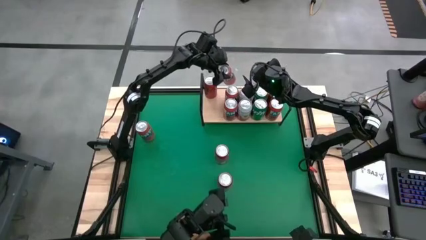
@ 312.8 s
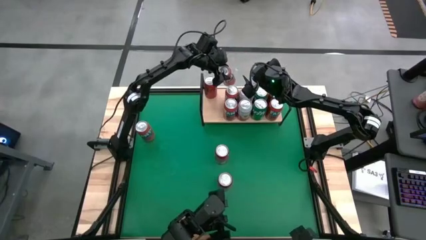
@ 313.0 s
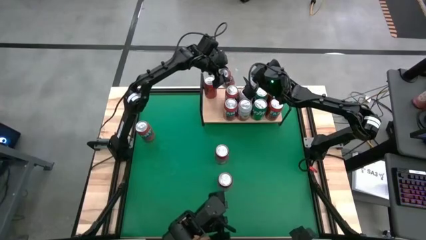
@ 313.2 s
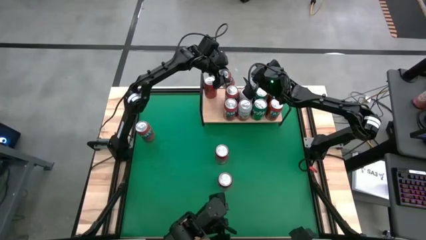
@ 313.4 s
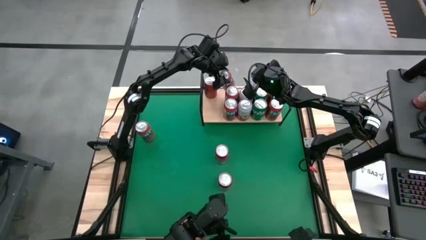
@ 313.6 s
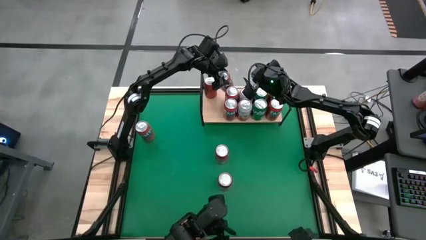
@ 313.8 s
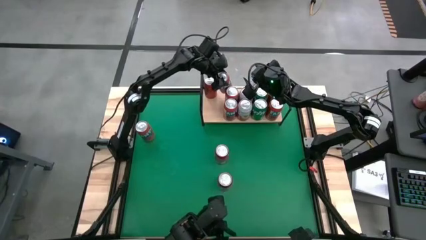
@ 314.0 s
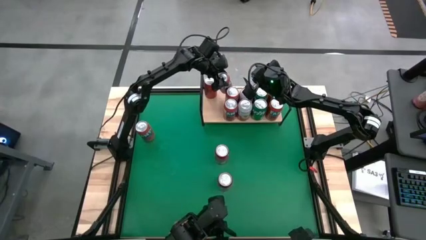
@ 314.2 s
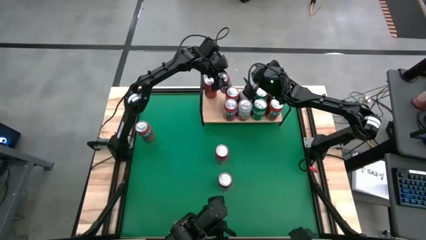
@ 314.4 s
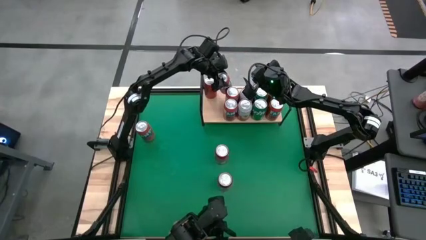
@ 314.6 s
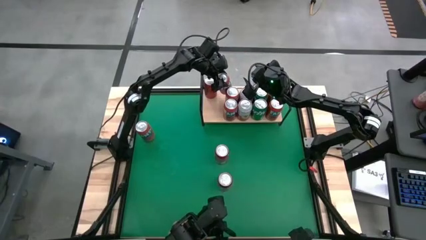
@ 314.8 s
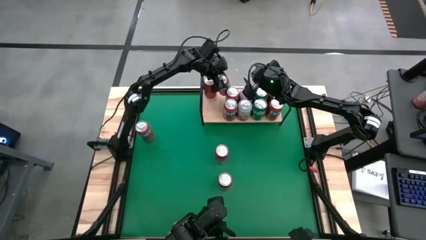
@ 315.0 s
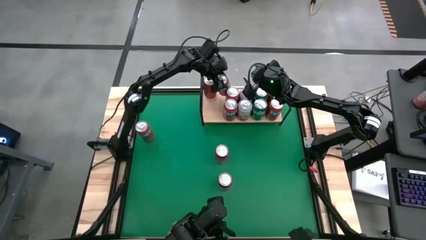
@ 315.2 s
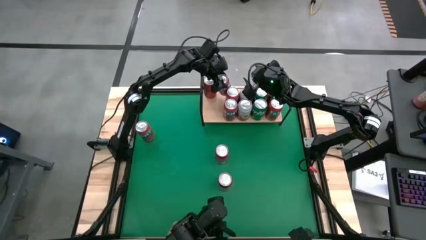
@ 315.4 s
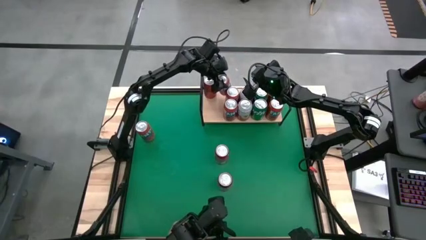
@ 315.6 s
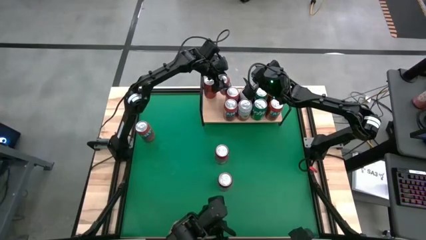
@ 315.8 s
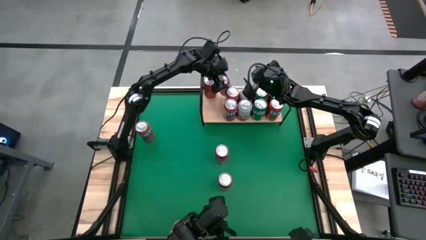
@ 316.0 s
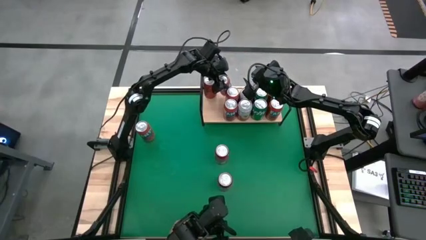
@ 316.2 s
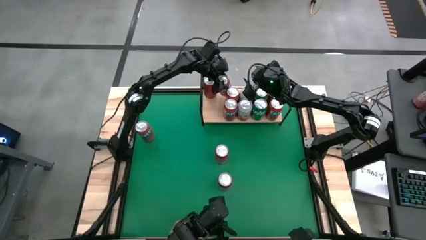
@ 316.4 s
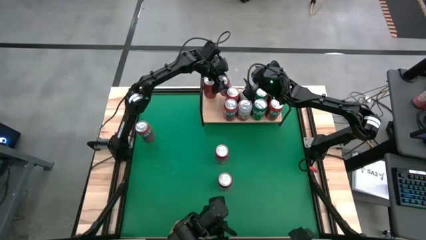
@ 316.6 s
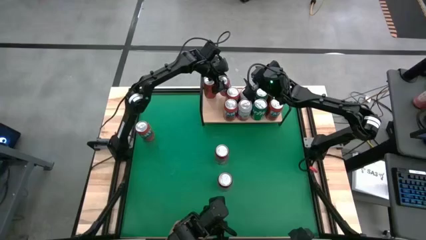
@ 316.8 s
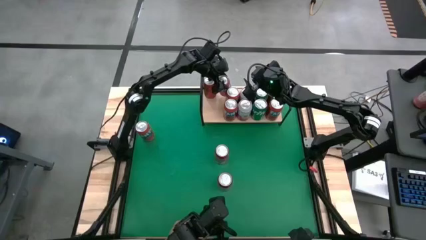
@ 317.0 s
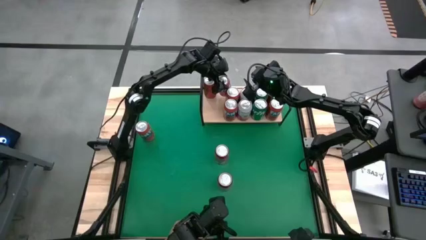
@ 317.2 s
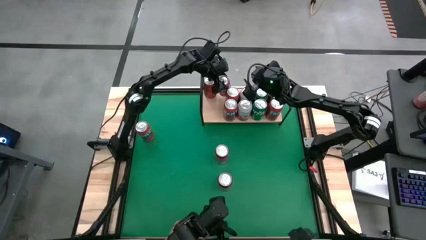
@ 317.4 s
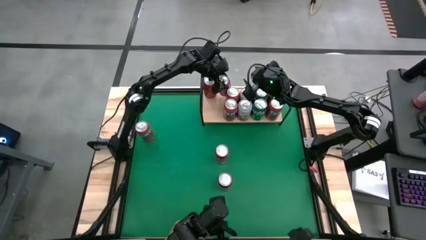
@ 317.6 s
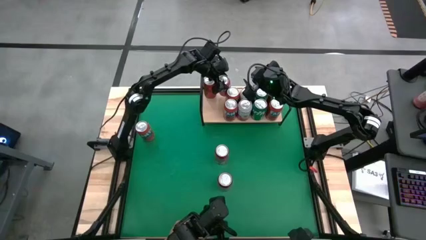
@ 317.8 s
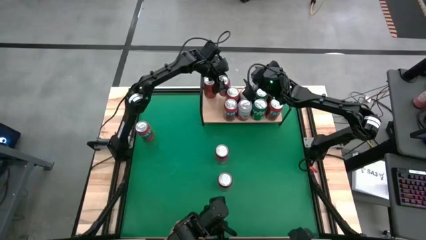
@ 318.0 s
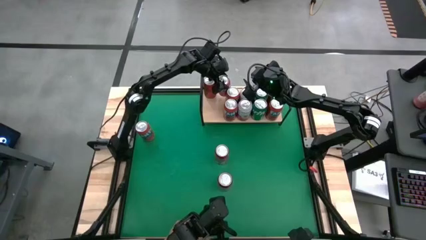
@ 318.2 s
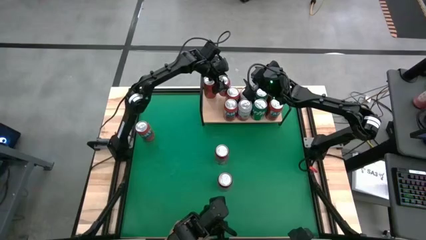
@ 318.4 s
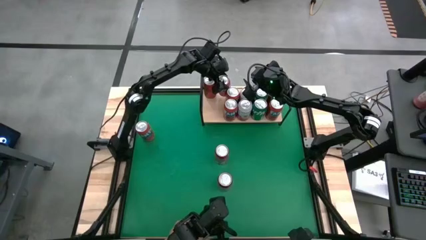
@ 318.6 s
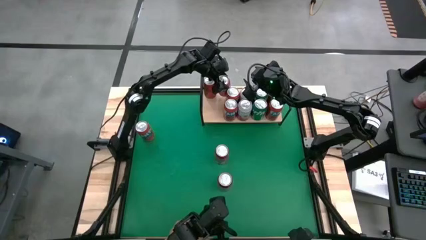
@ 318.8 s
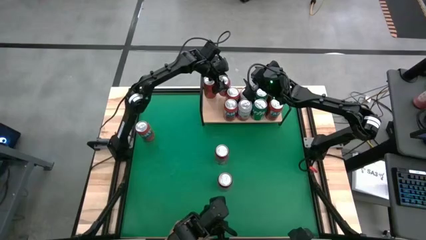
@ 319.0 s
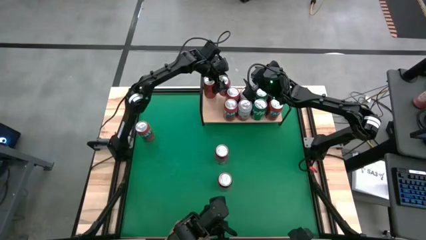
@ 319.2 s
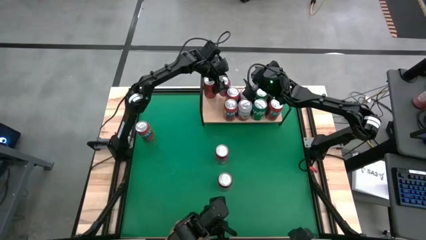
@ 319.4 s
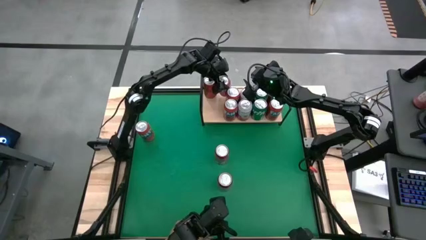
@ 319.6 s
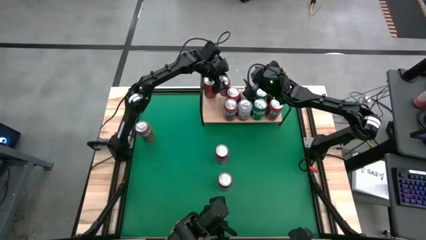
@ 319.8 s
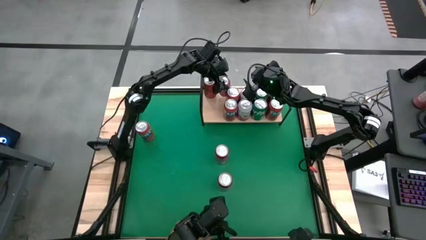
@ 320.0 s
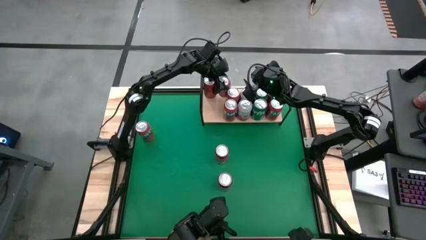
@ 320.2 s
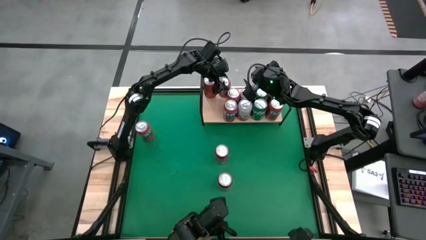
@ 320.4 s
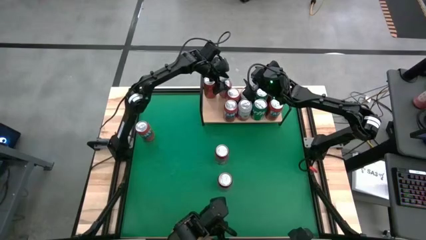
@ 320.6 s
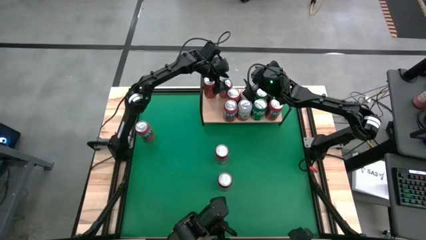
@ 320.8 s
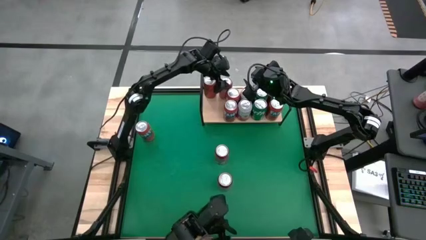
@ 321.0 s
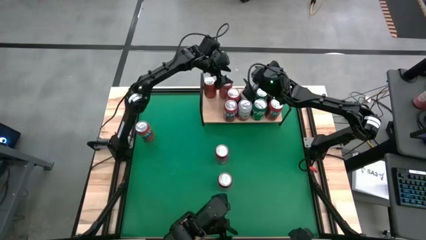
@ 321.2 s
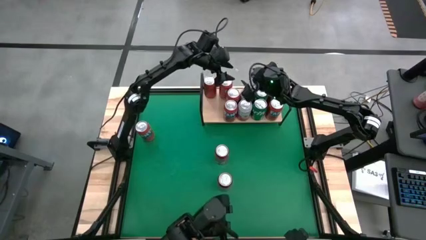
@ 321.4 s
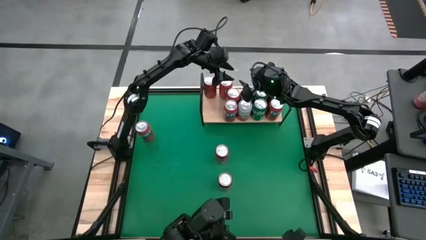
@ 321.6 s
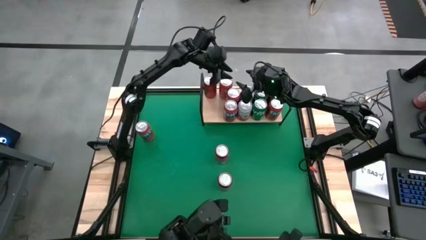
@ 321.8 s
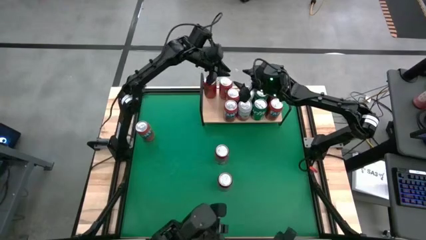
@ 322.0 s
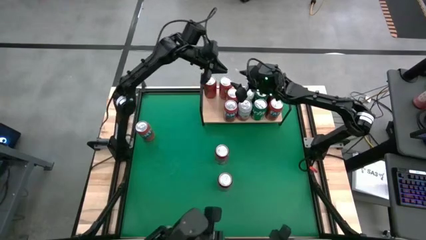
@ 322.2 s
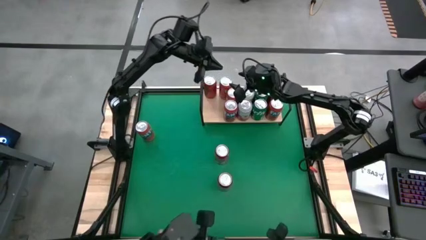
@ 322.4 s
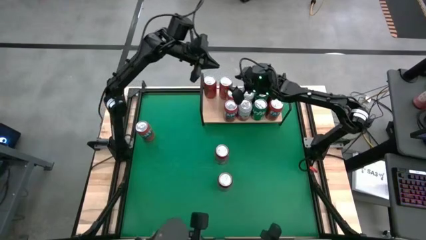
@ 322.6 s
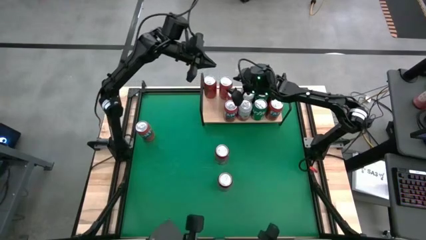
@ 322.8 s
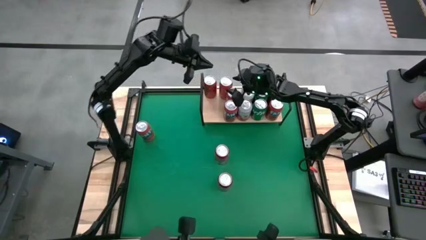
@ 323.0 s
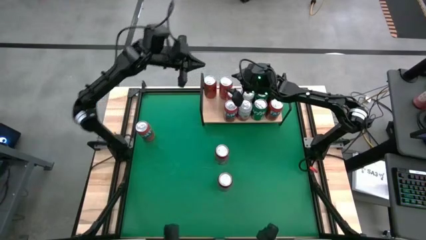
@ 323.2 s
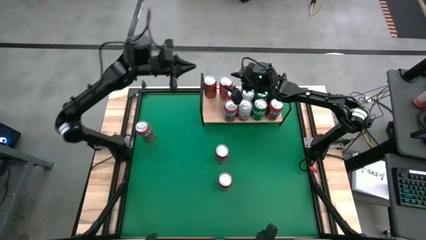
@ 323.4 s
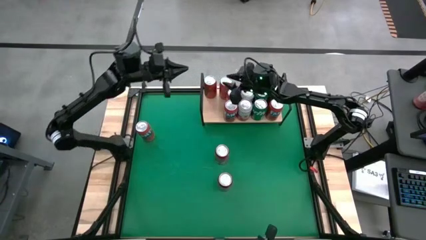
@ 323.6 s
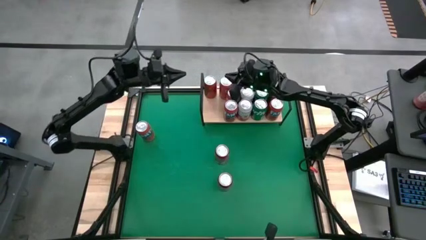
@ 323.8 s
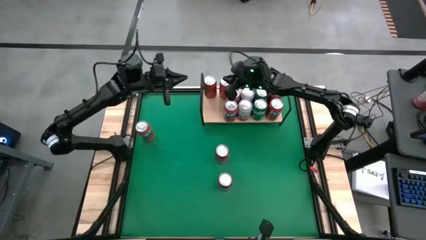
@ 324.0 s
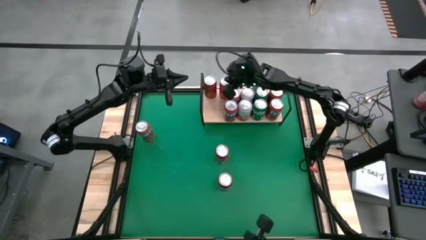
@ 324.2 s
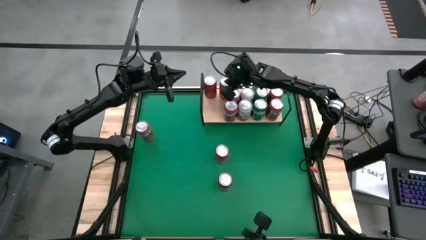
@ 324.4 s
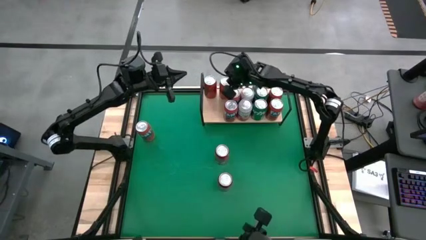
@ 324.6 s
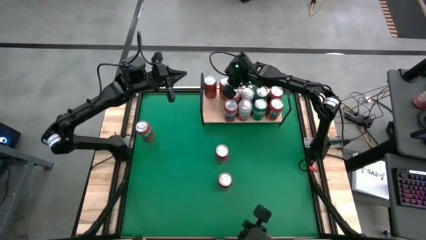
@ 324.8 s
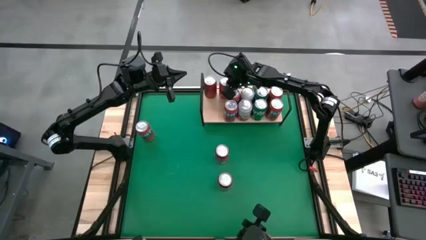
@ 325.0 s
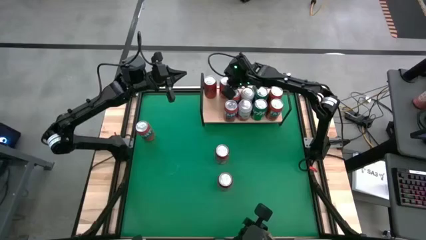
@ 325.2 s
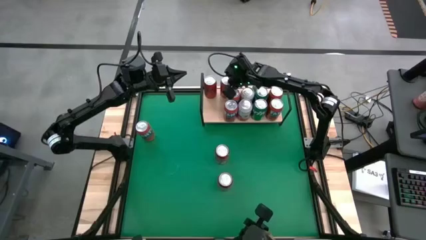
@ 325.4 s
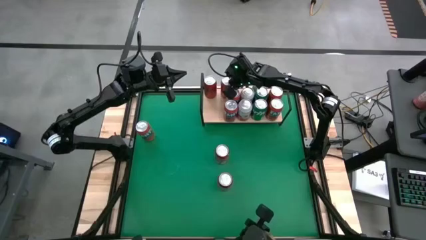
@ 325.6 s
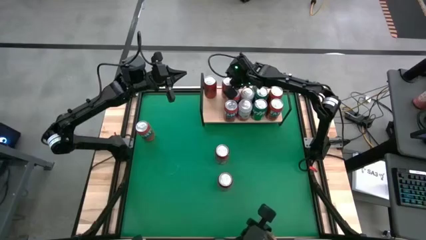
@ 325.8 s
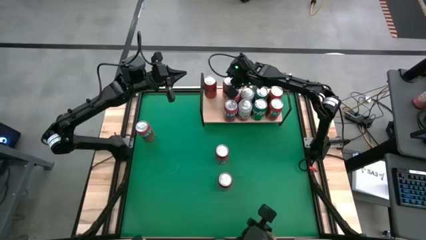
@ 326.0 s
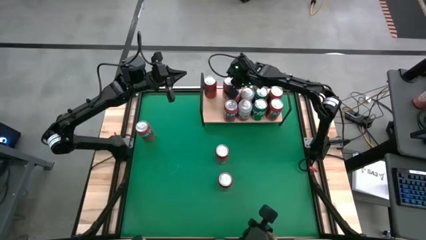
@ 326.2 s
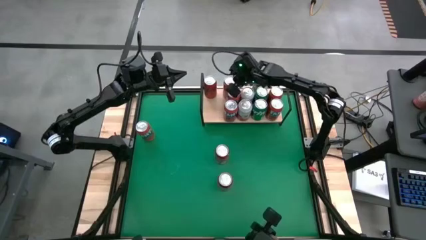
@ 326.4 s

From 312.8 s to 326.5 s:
Task: Place canned beverage on shelf
Put the red soda can on the shelf aligned with the other red soda can
